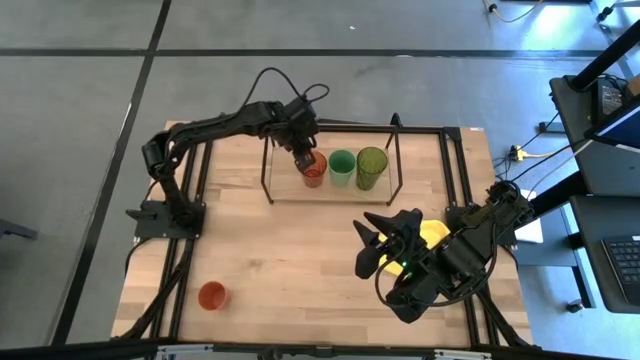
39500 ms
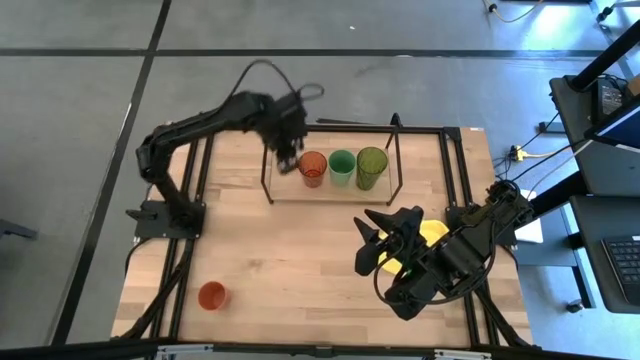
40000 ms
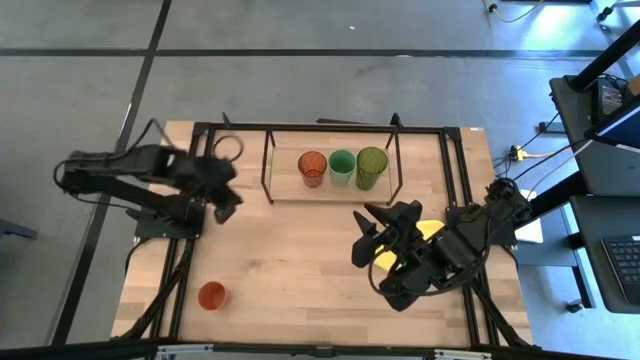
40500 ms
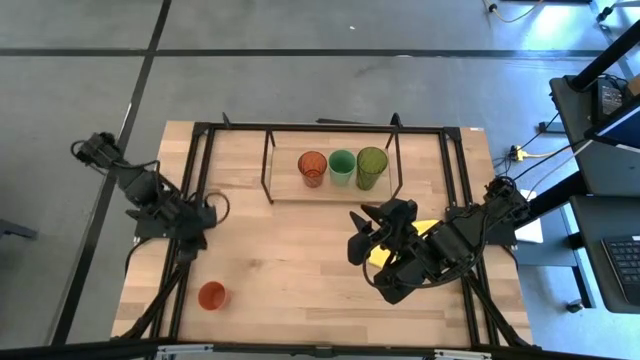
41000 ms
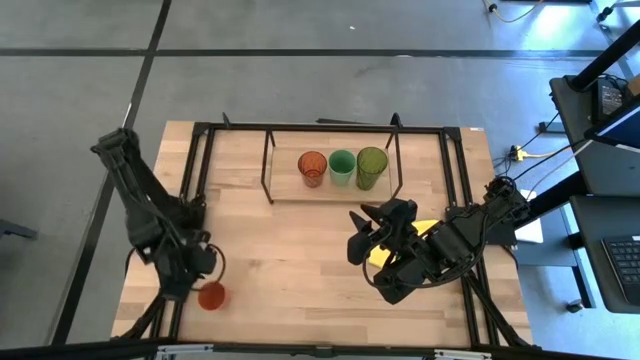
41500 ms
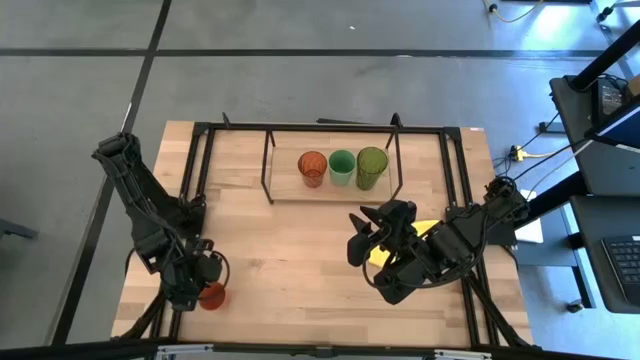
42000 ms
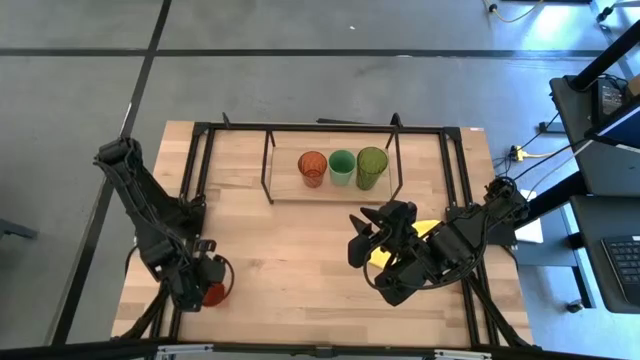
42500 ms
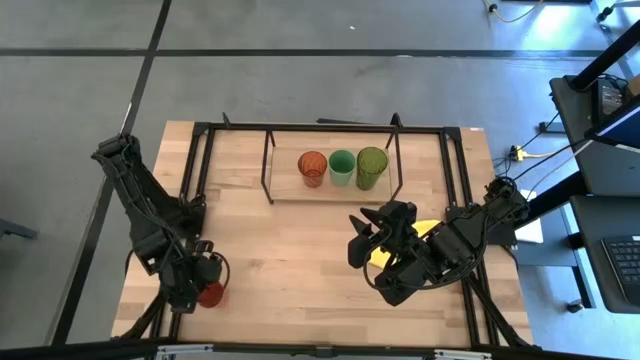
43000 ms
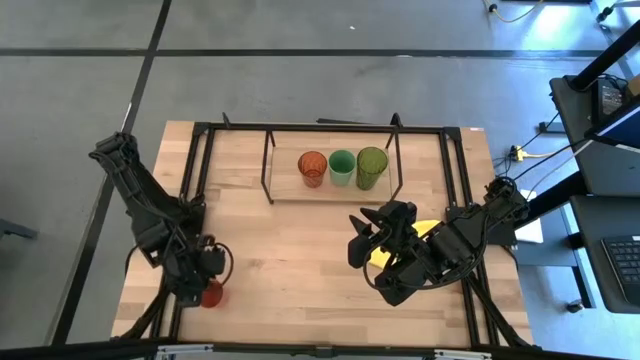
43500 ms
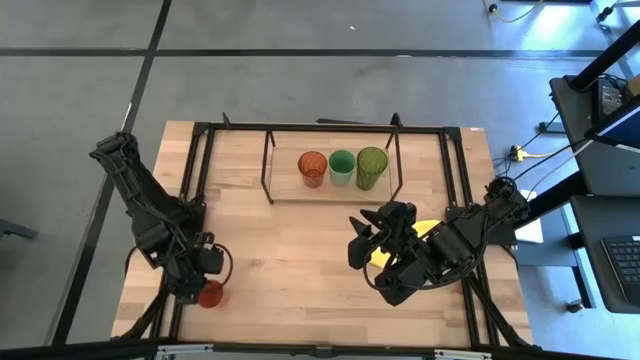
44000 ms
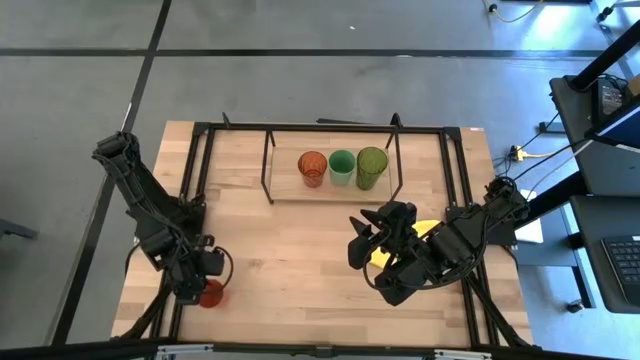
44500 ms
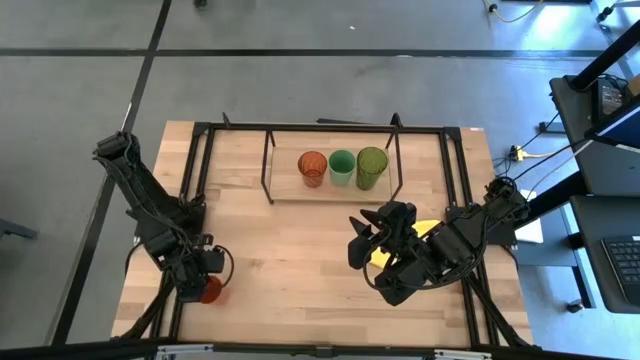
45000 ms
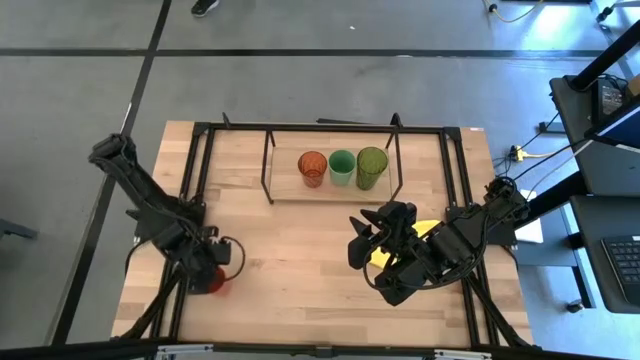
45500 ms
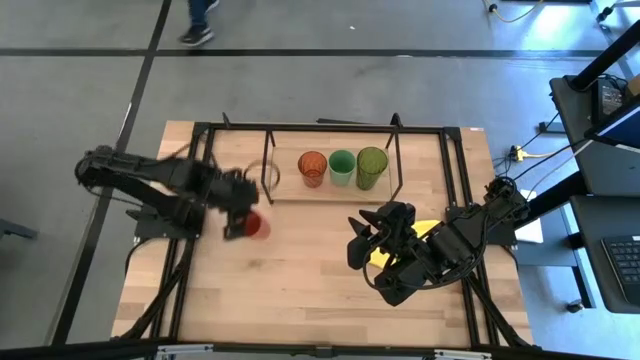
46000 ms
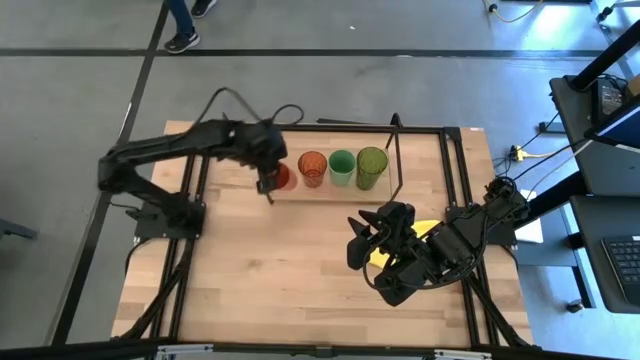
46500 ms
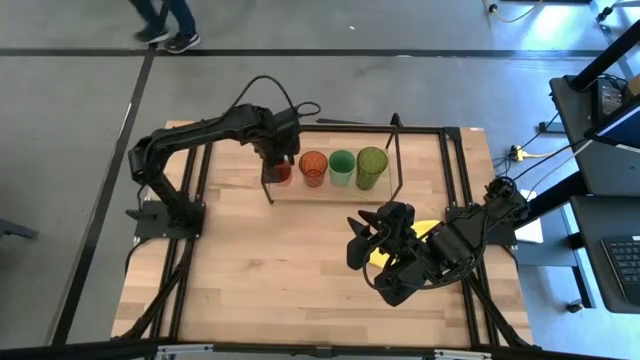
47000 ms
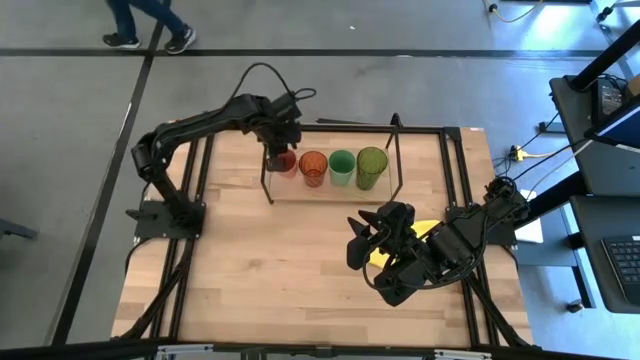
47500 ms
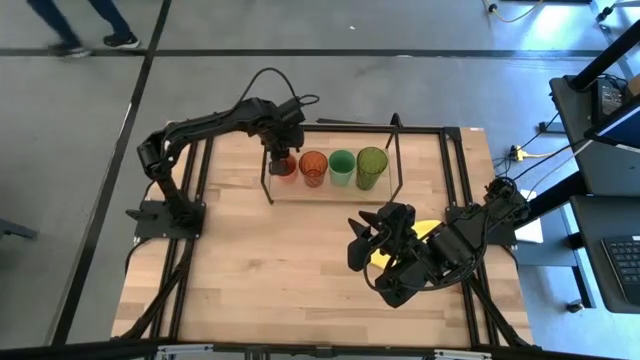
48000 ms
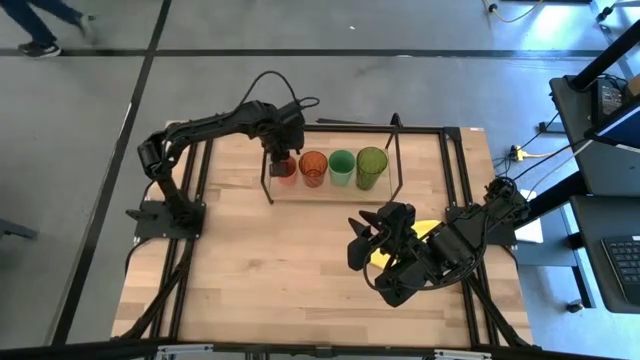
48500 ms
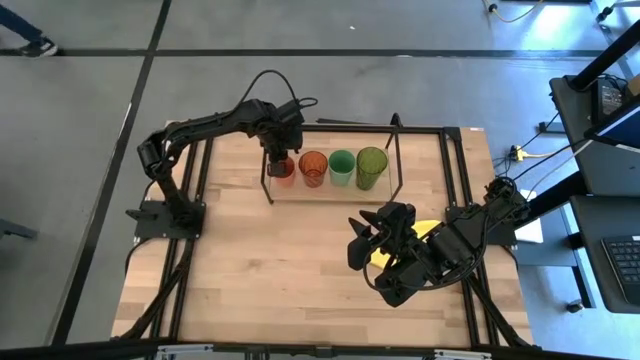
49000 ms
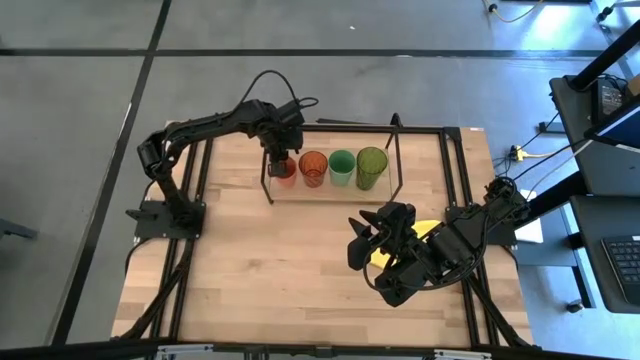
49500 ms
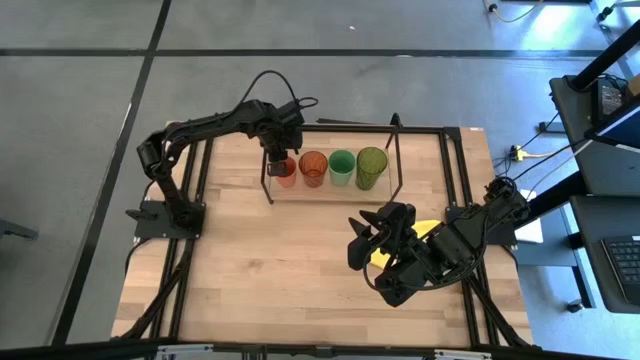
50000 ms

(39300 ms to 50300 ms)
Task: Stack small to large cups/mugs on shelf
Put the orange cup on the shelf

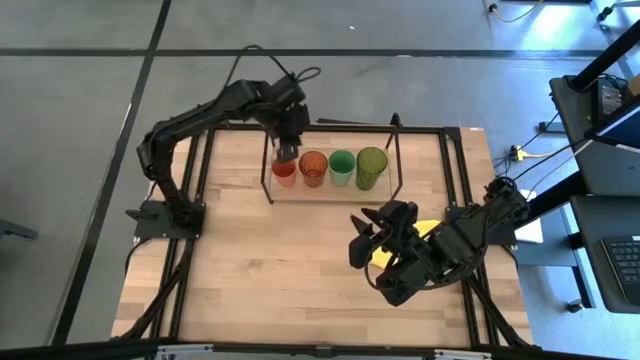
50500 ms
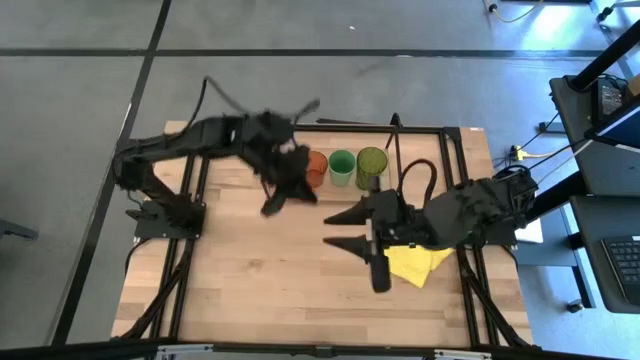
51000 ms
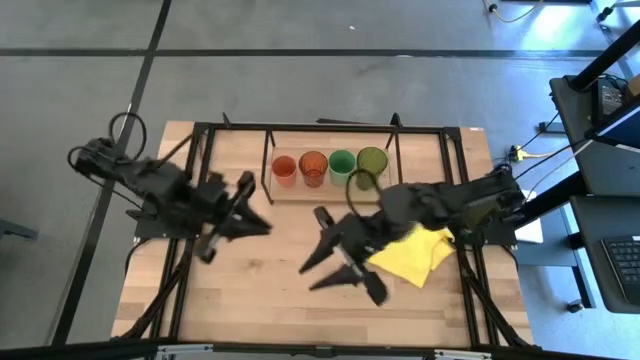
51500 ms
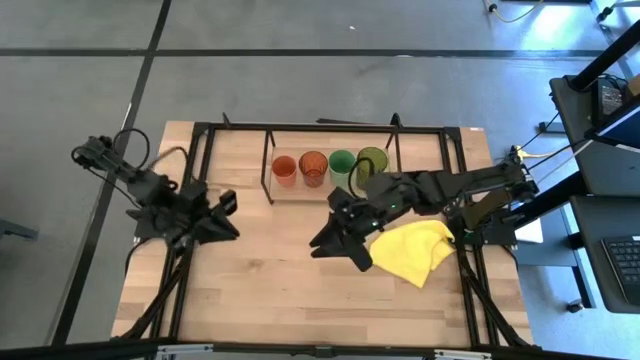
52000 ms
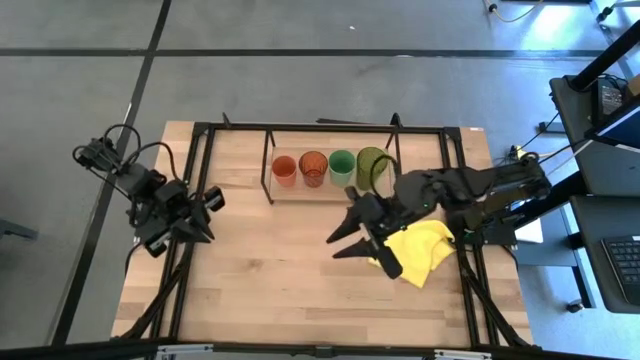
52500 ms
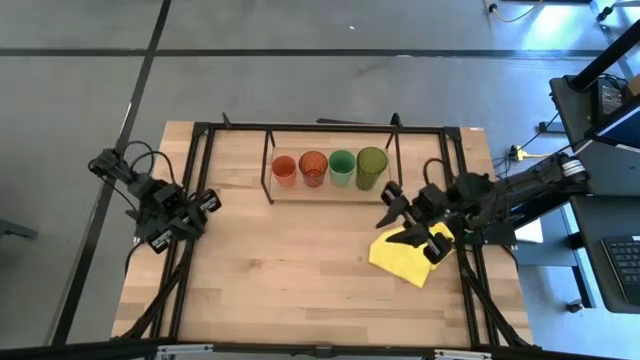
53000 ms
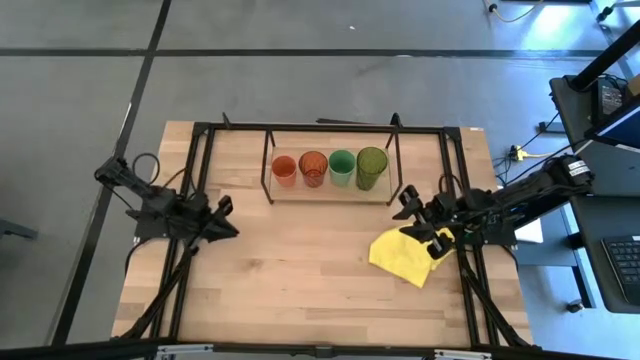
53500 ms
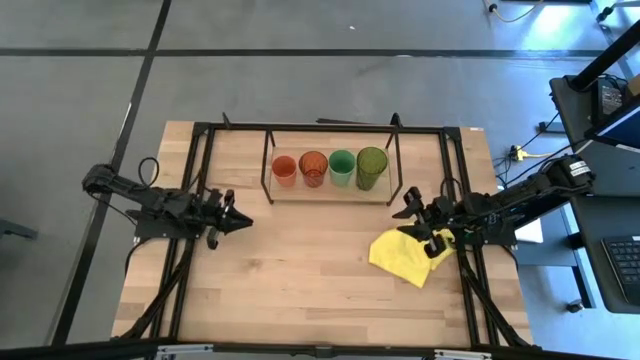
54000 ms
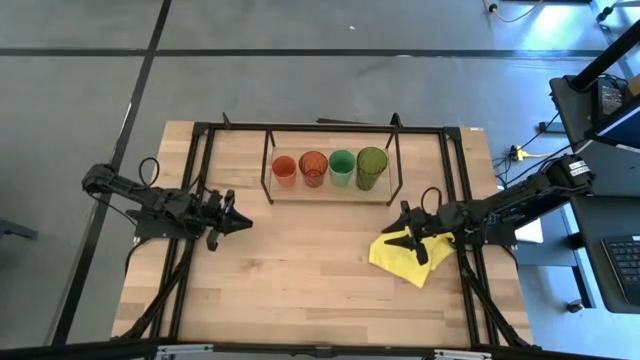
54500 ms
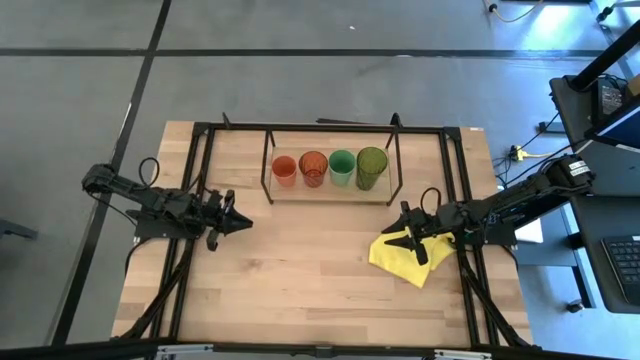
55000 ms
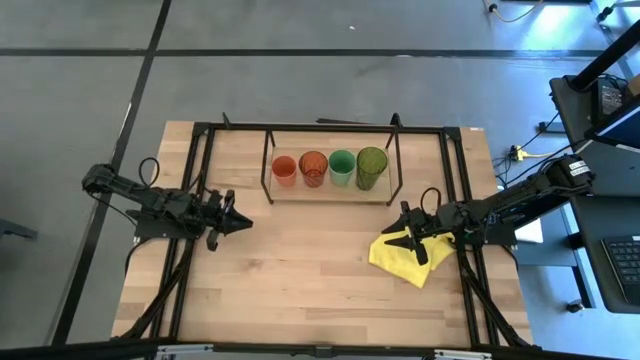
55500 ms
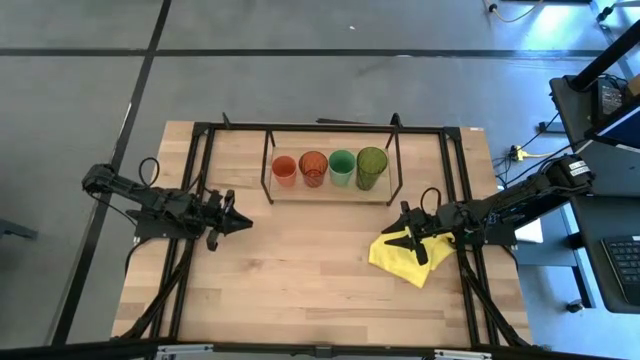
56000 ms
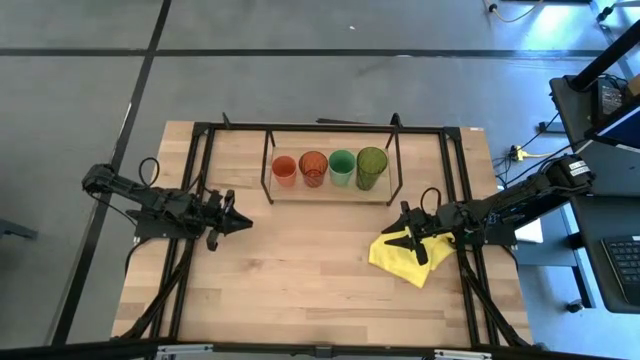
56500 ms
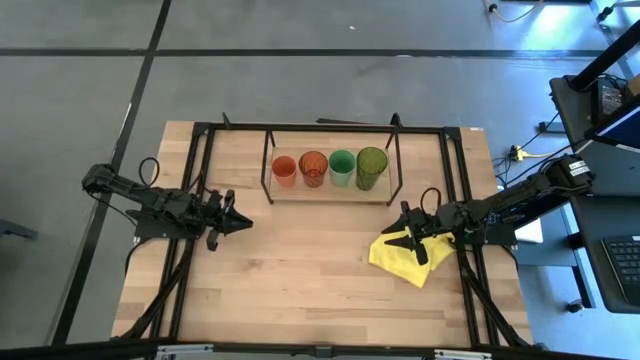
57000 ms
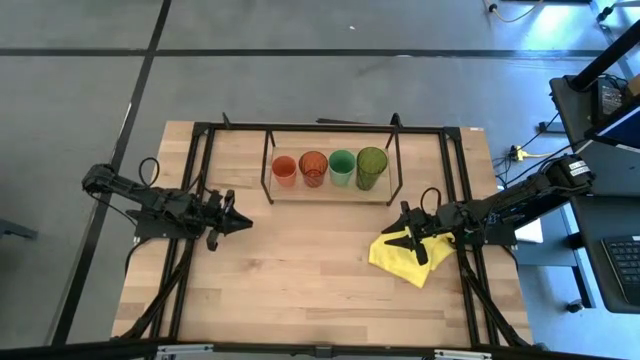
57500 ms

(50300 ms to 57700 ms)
Return to Home Position
